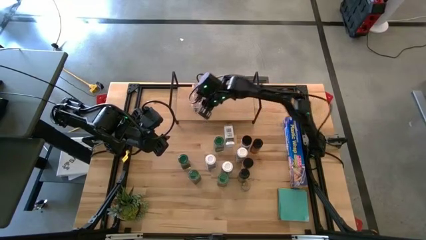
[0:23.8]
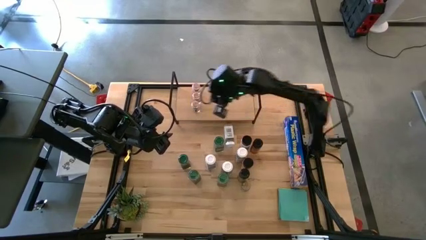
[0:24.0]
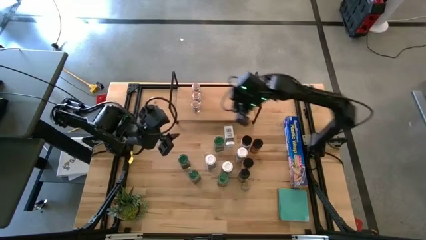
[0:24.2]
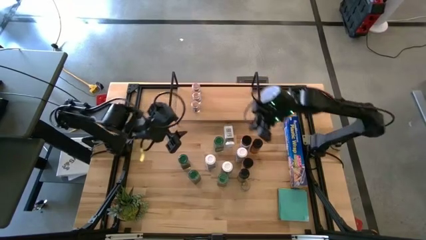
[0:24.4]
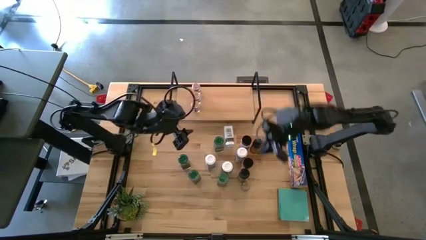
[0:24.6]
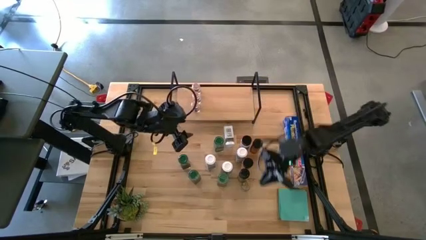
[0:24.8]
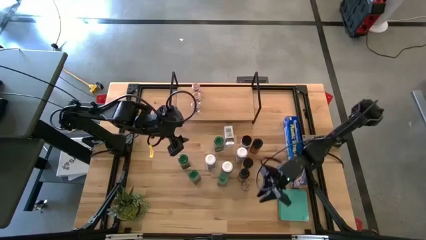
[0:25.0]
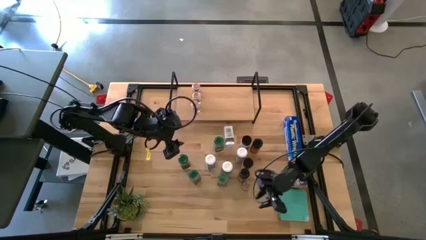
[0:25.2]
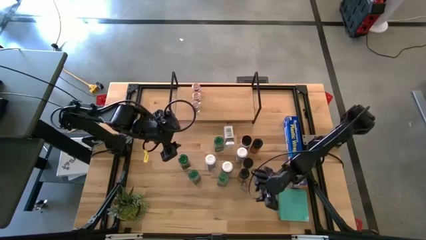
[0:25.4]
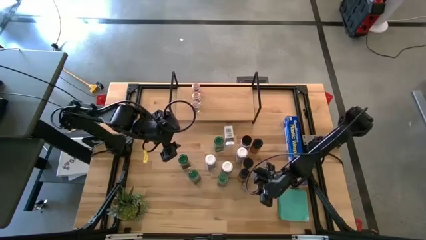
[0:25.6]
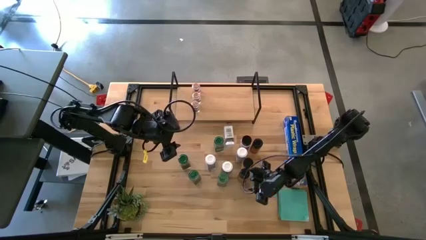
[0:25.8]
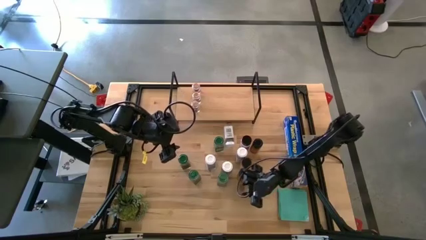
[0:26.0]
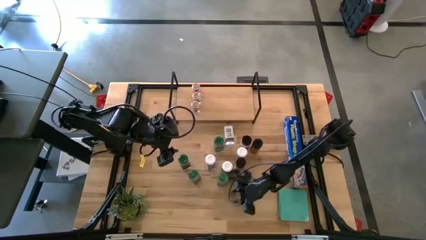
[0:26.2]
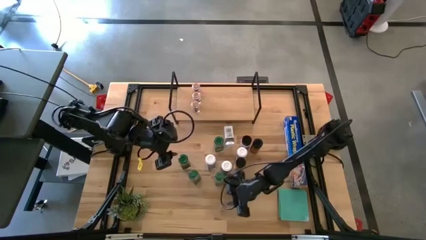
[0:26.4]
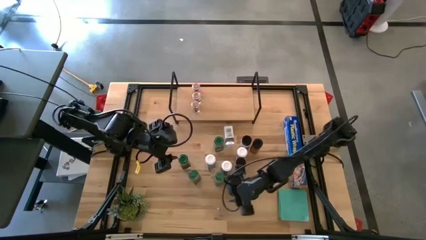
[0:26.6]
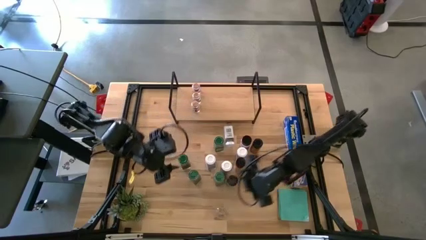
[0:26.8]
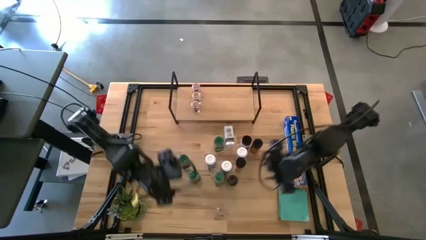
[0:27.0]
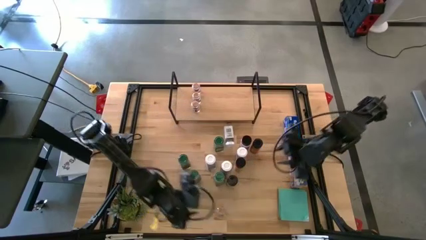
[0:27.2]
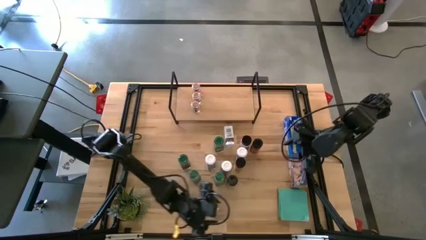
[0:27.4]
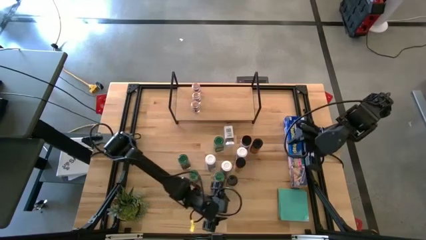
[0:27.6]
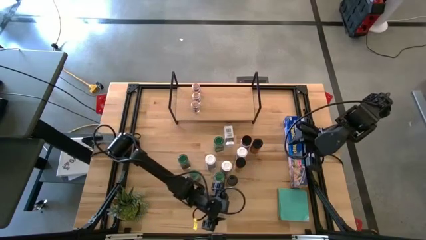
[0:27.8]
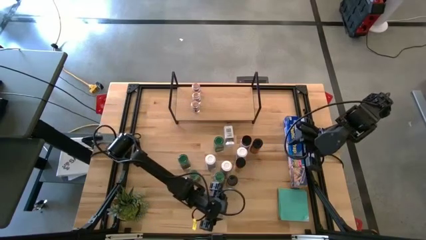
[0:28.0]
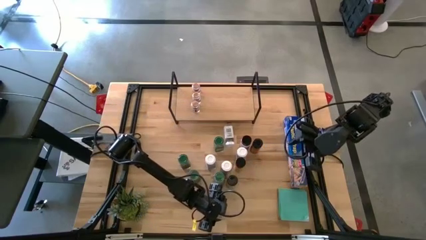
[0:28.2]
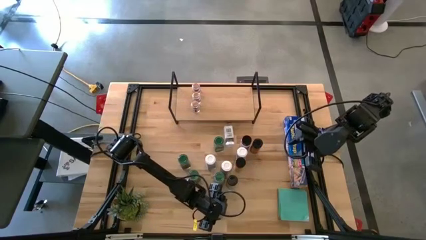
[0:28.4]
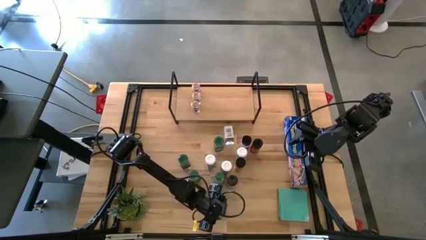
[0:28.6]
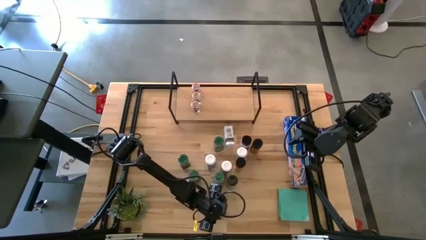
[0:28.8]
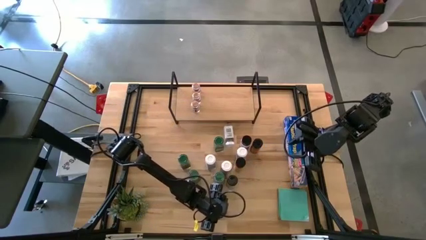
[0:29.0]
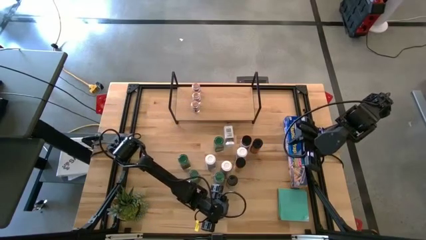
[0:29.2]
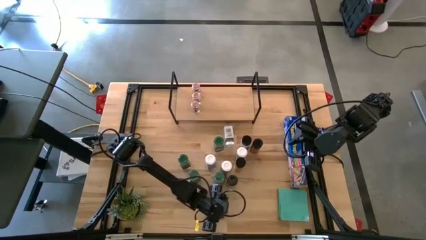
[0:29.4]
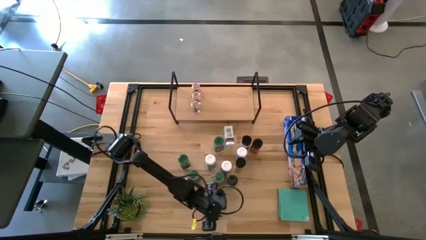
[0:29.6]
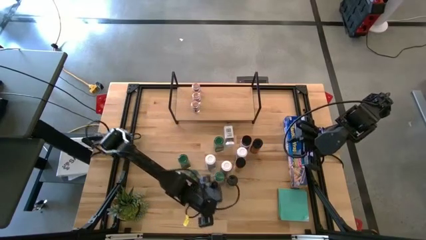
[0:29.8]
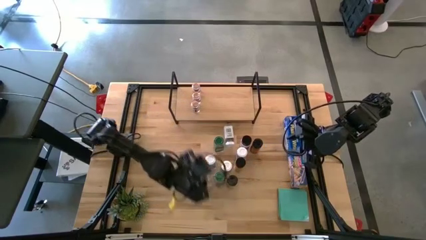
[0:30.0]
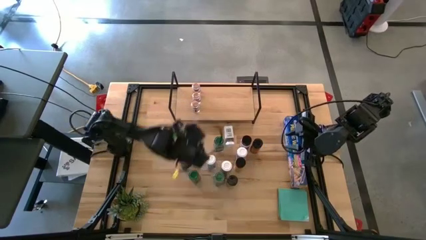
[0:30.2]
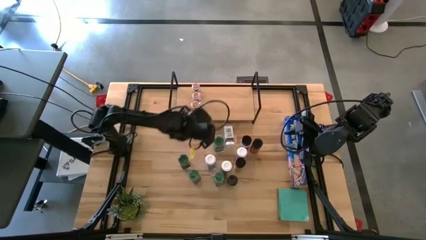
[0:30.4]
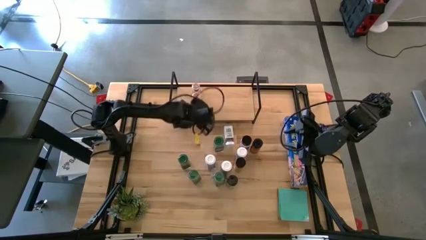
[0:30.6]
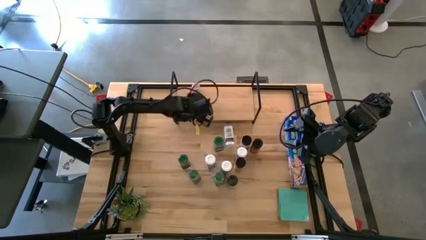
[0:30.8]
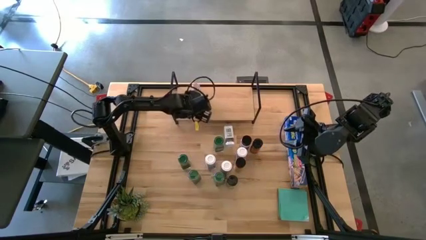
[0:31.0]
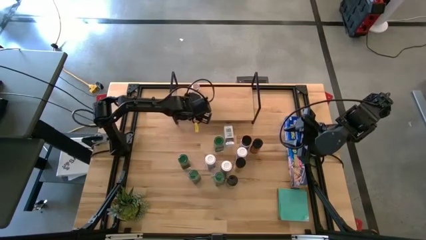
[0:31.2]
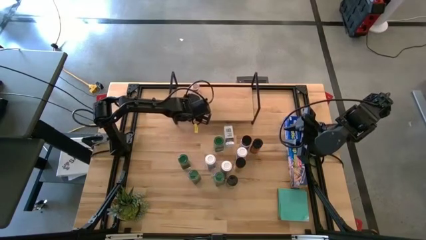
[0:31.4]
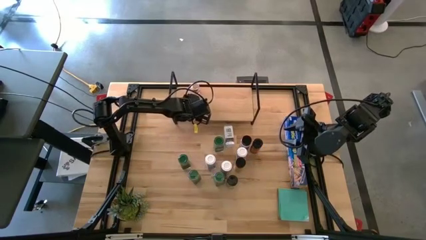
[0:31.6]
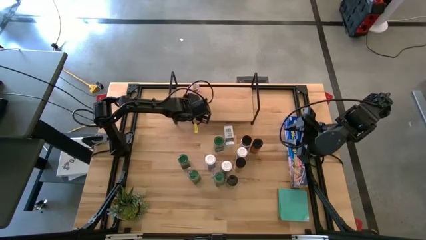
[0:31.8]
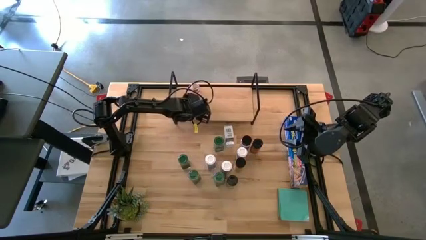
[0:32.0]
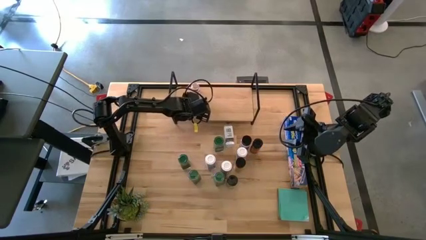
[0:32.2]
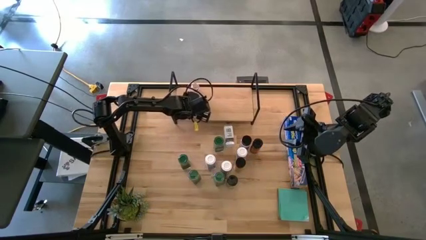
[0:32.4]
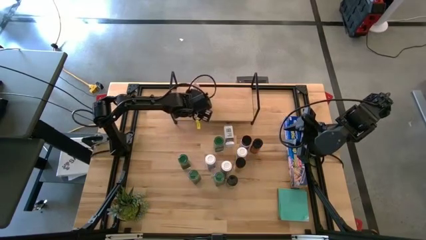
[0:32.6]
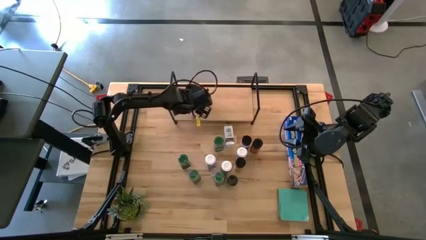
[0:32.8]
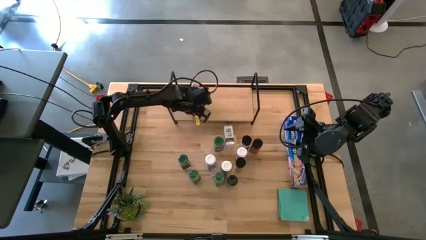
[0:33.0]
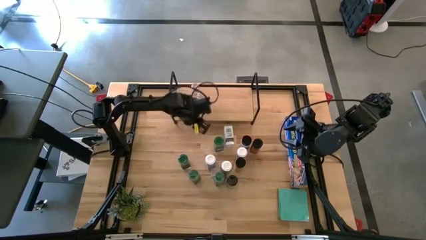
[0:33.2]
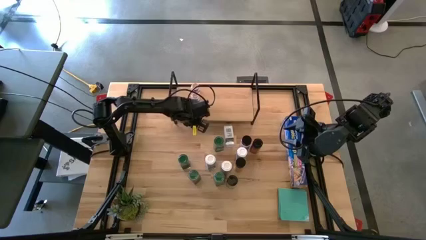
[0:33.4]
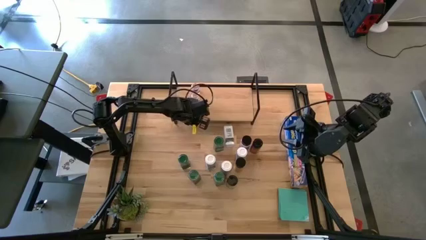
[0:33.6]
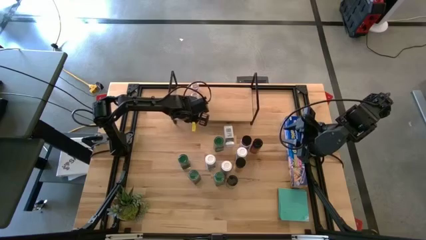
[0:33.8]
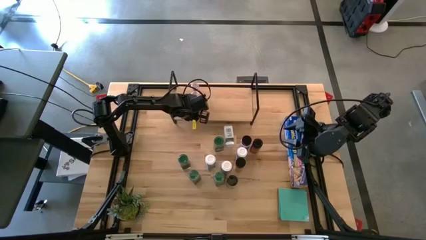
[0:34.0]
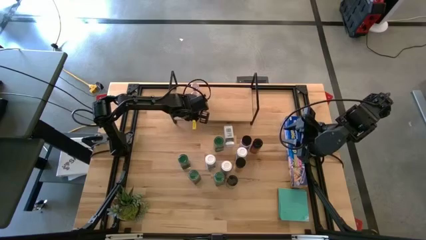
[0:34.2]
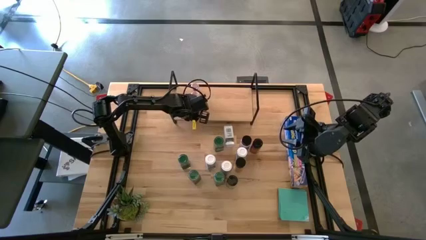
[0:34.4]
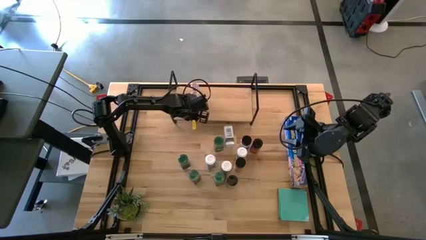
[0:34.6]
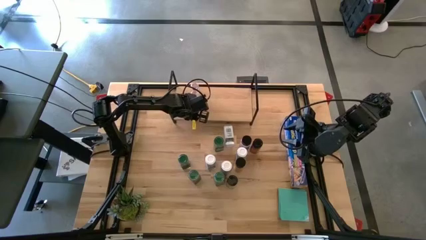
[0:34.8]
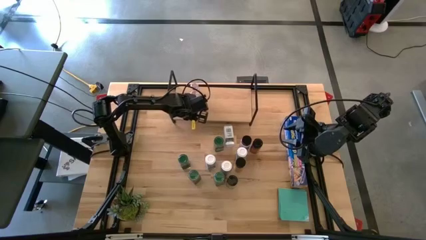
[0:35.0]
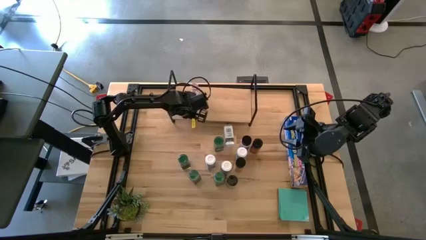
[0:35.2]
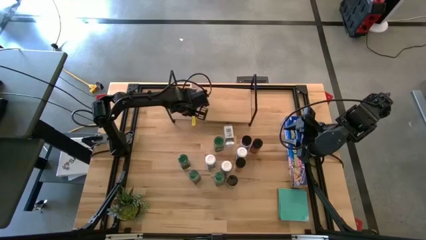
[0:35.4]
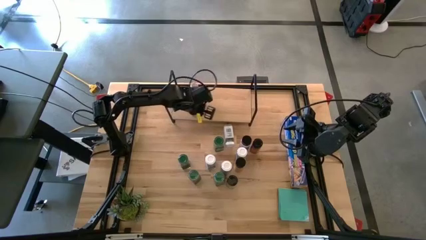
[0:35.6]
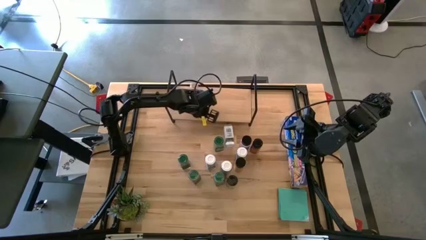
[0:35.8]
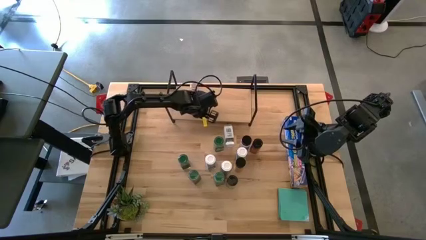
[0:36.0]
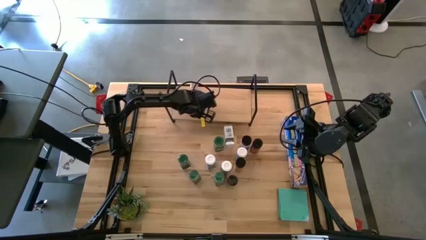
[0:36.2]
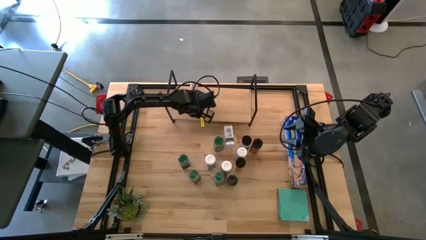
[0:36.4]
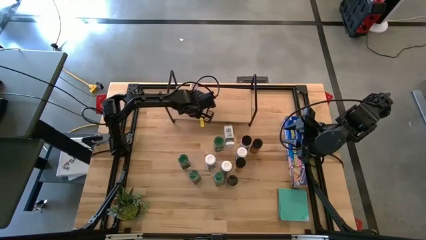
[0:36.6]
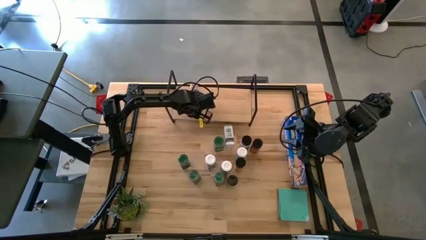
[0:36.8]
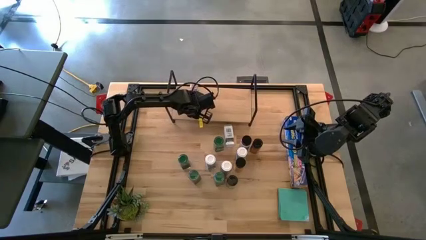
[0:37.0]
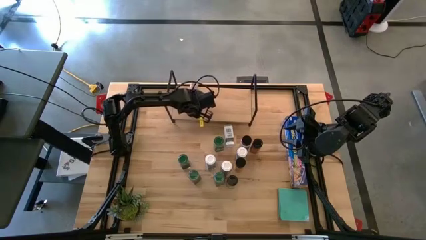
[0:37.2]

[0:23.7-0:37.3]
Task: Shelf spices
Put the brown seasoning bottle on the shelf aligned with the other brown seasoning bottle
